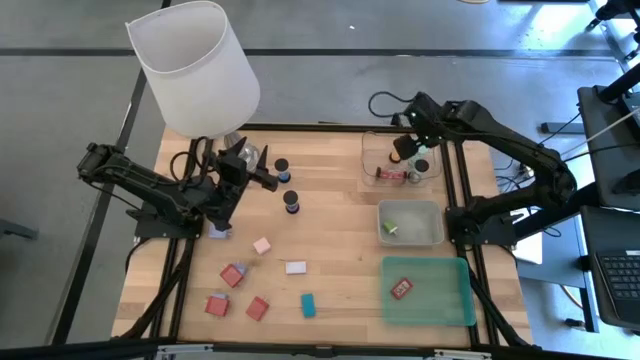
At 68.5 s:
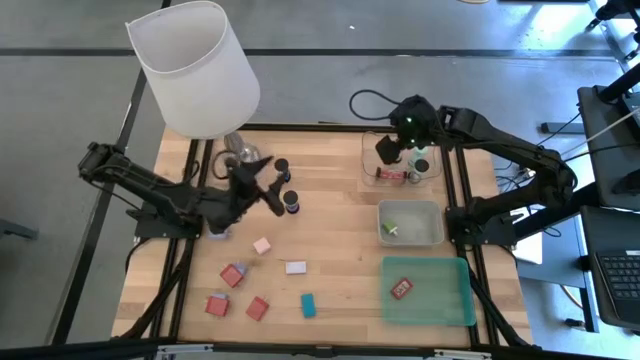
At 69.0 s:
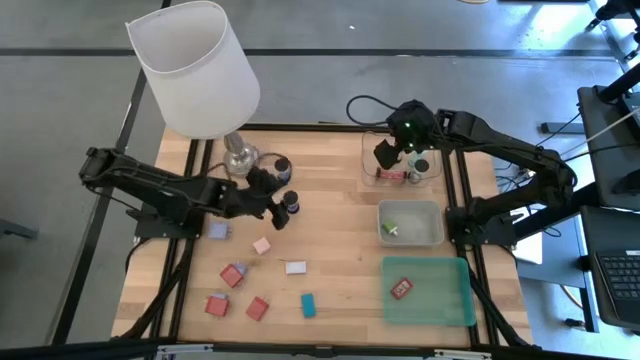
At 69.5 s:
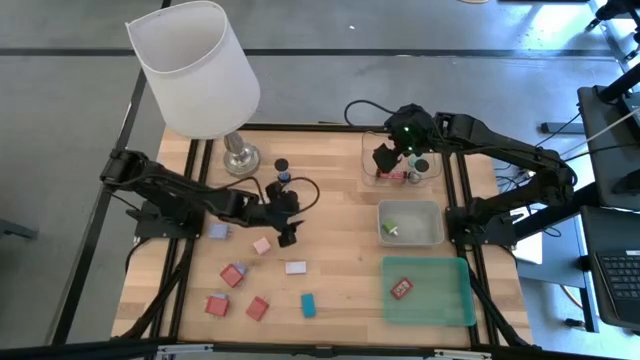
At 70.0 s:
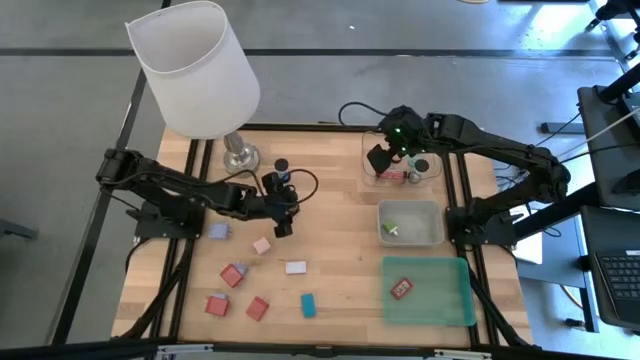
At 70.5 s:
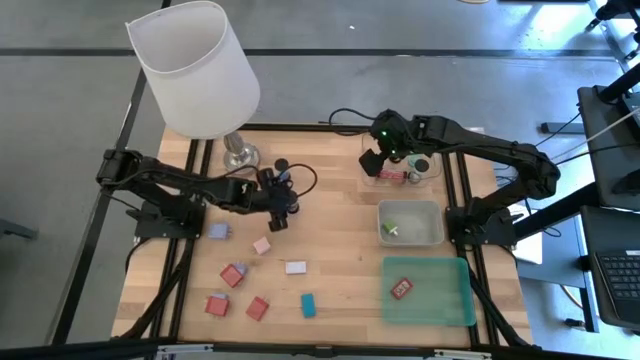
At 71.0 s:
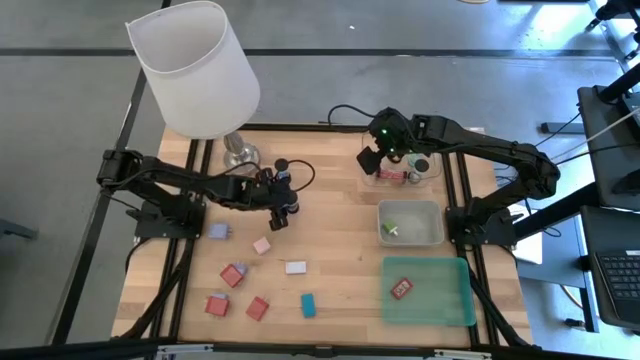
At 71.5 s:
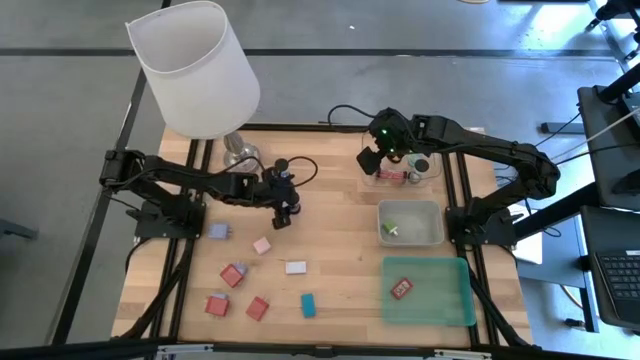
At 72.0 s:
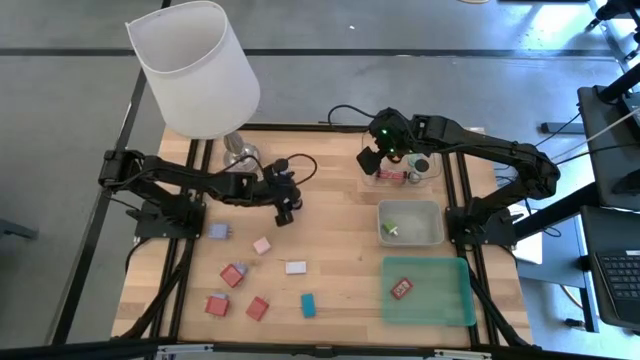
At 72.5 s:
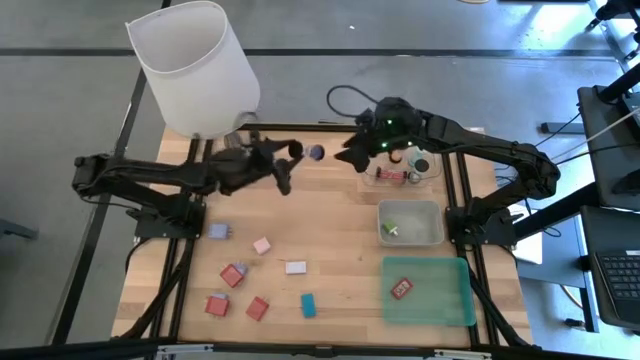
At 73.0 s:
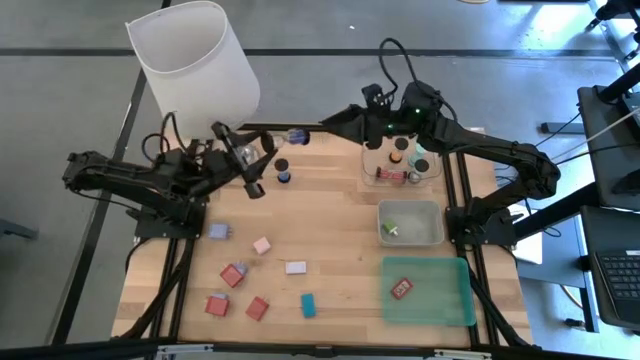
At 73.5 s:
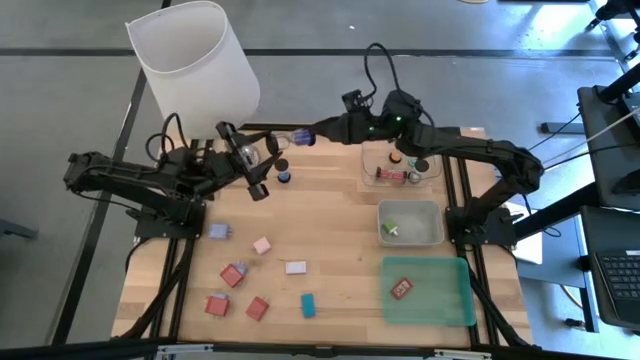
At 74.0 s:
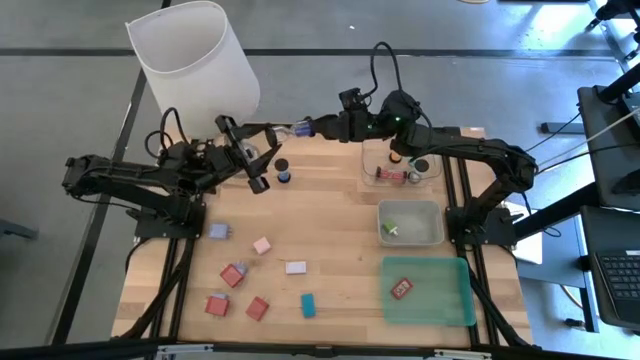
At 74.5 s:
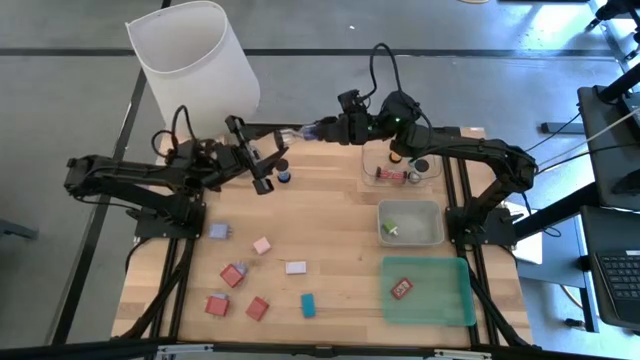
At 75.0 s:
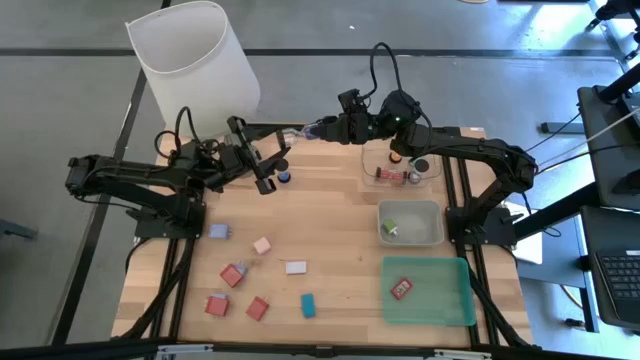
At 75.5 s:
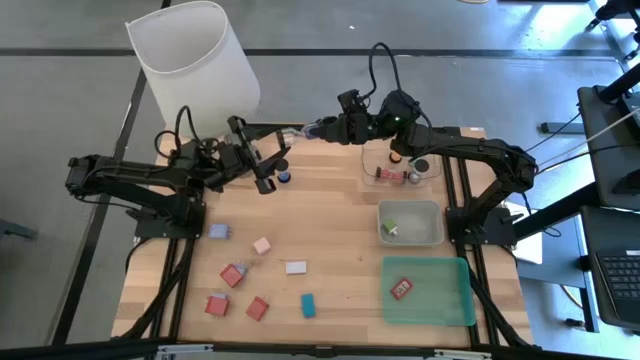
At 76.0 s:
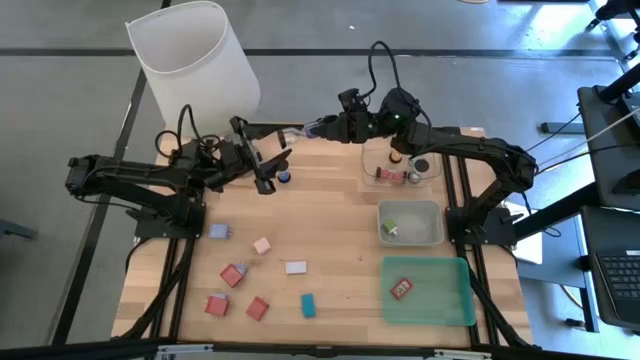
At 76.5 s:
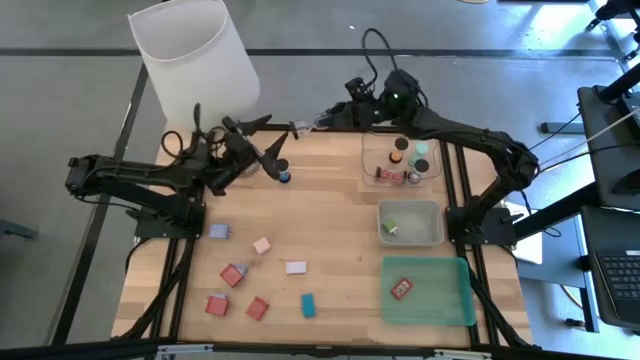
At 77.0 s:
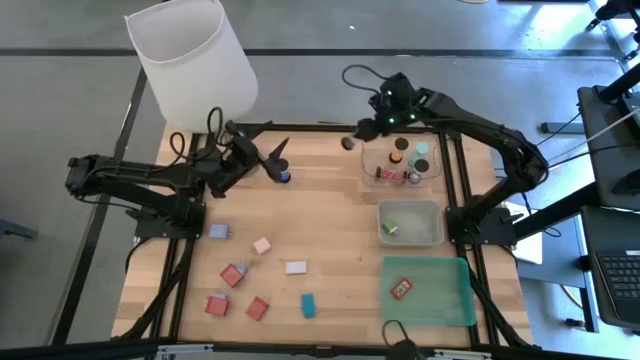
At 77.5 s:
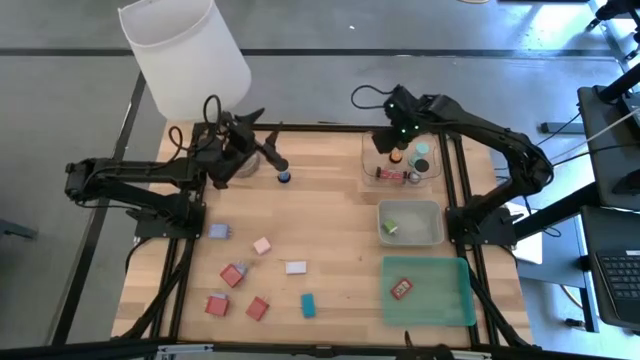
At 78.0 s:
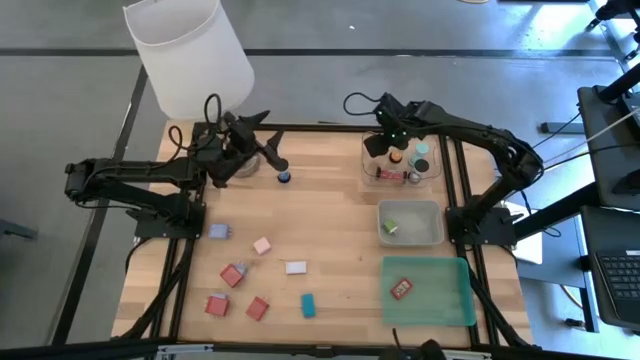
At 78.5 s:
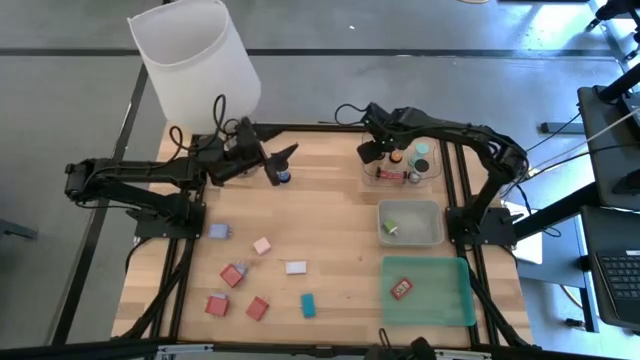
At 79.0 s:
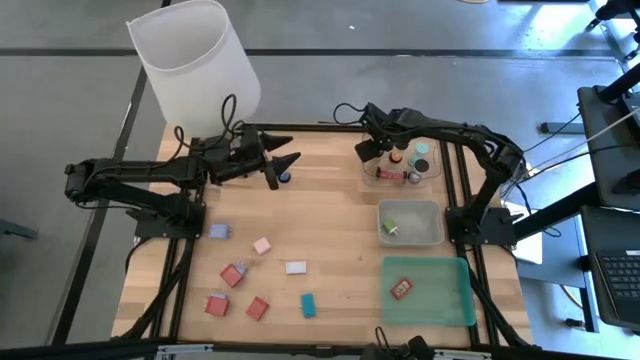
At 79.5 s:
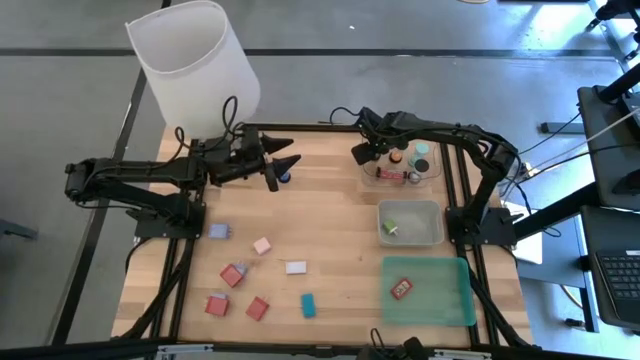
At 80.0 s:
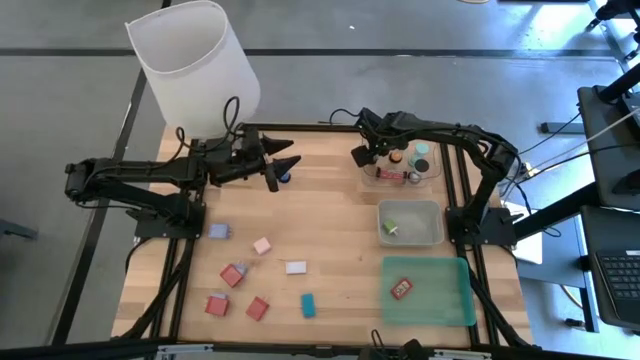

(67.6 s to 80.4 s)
Task: Pick & Place Office items
Put the purple hourglass into the transparent bin

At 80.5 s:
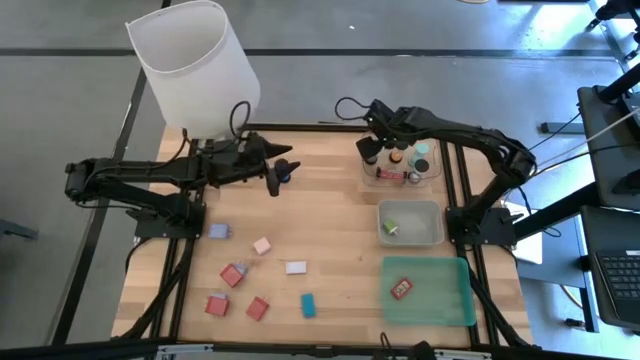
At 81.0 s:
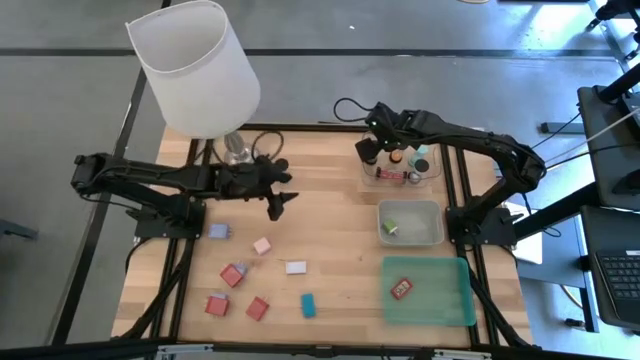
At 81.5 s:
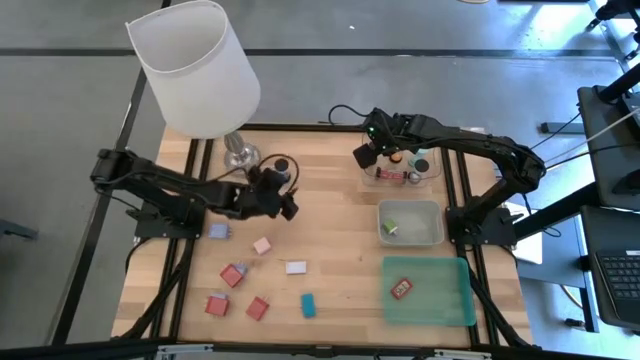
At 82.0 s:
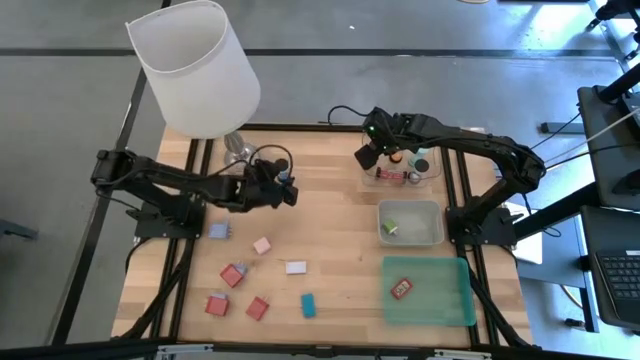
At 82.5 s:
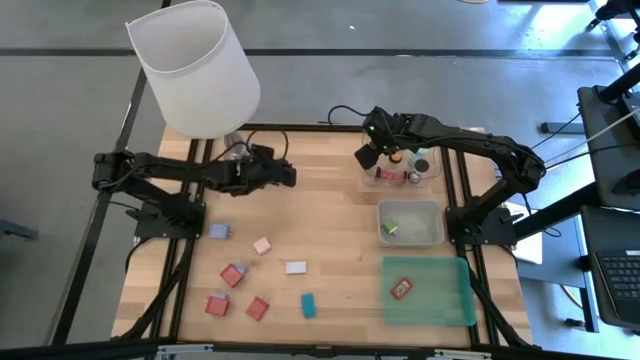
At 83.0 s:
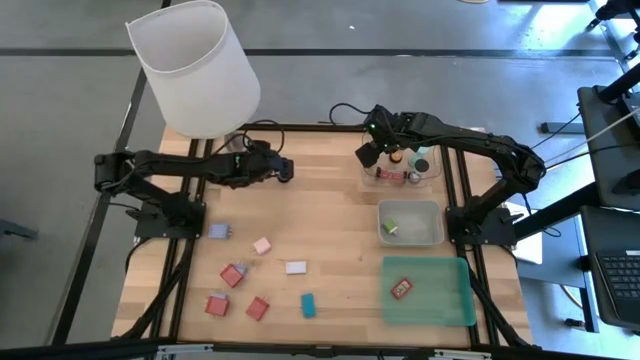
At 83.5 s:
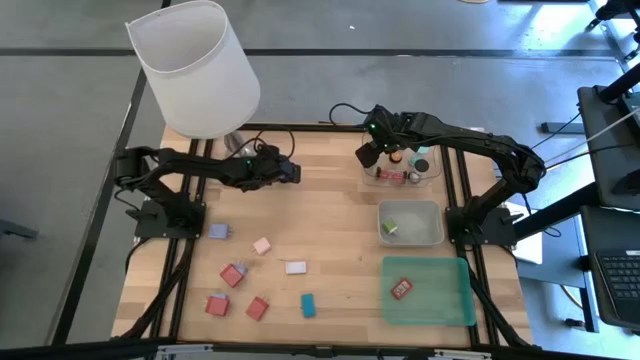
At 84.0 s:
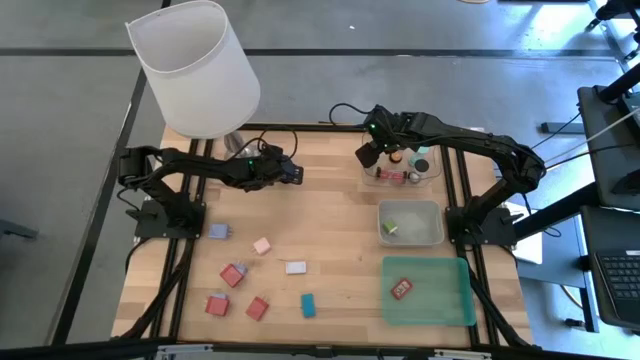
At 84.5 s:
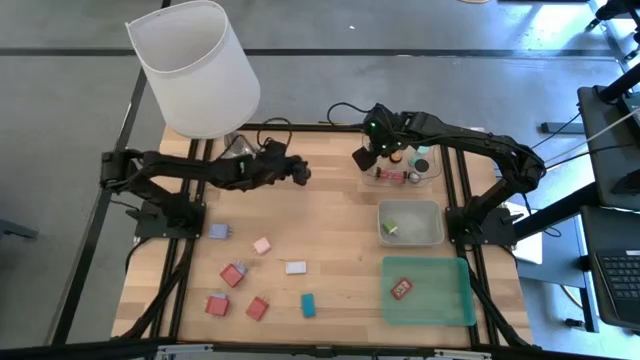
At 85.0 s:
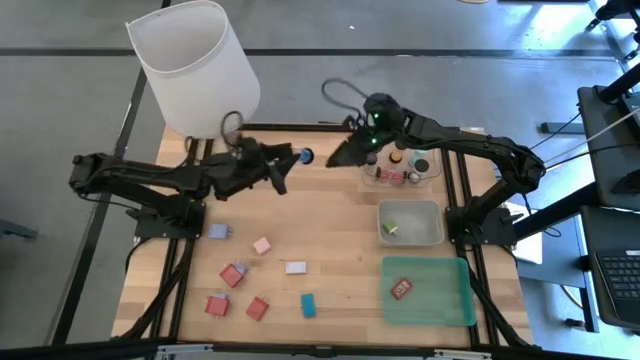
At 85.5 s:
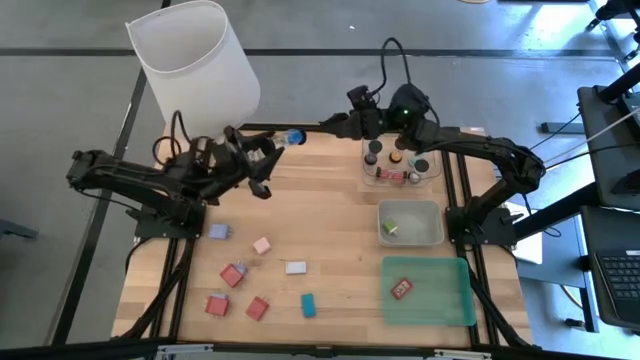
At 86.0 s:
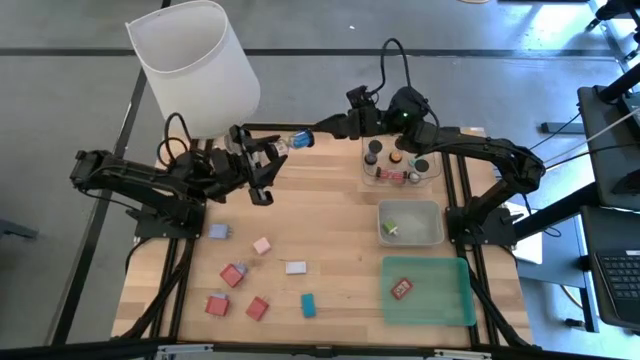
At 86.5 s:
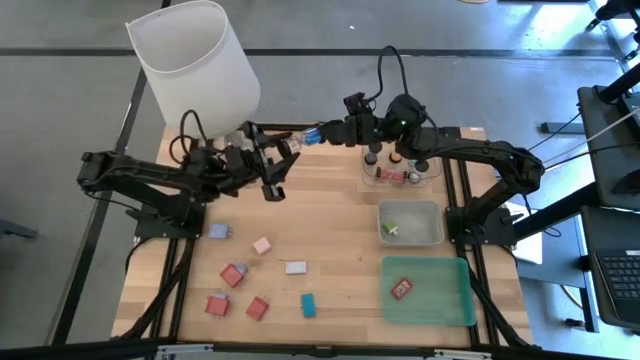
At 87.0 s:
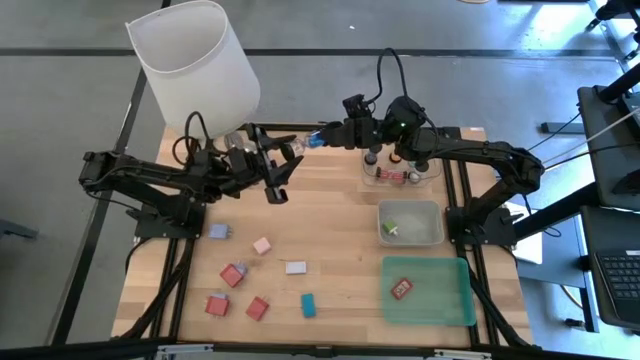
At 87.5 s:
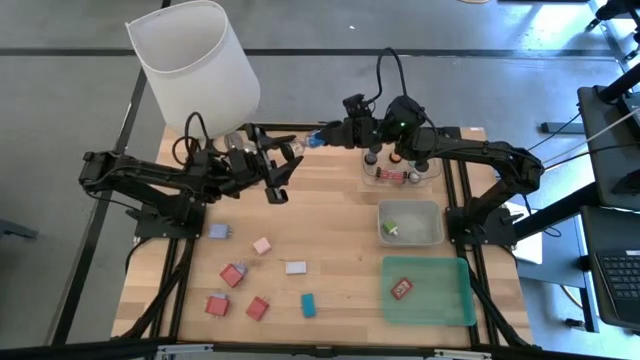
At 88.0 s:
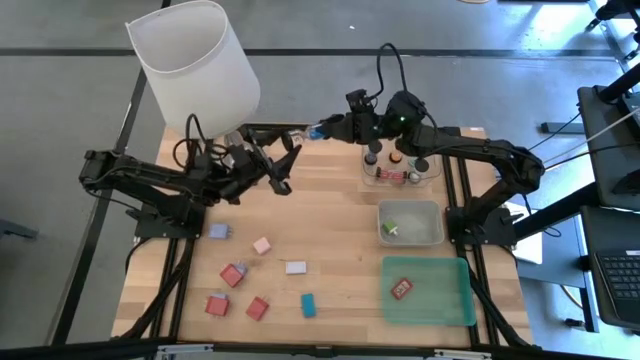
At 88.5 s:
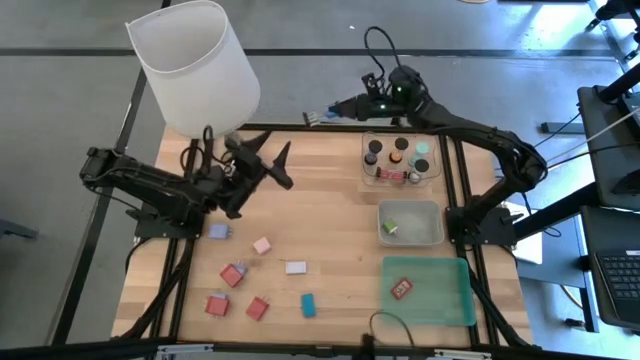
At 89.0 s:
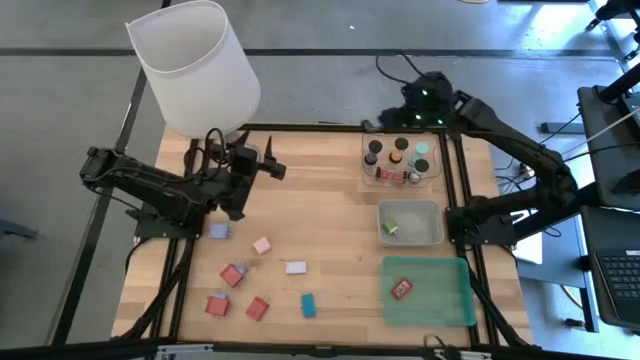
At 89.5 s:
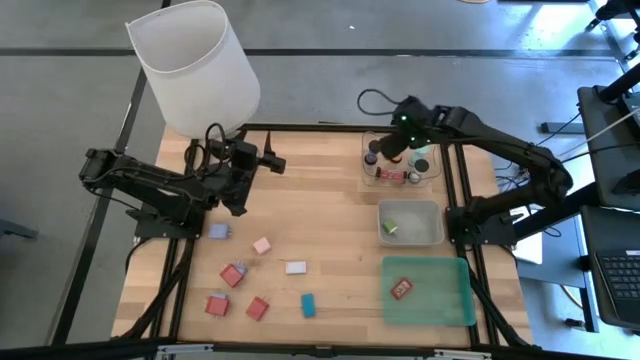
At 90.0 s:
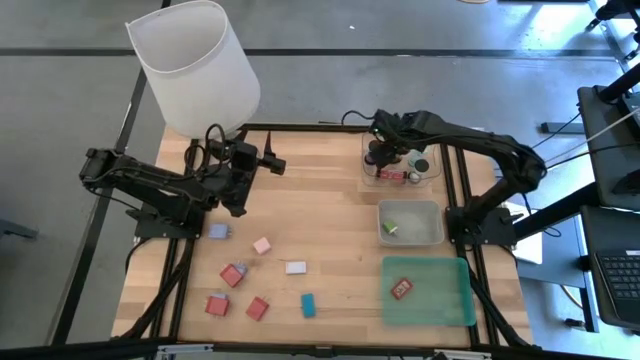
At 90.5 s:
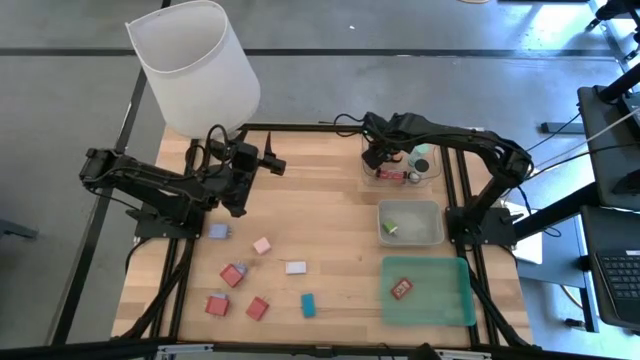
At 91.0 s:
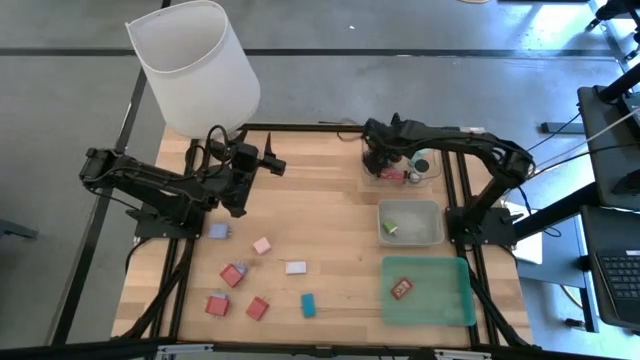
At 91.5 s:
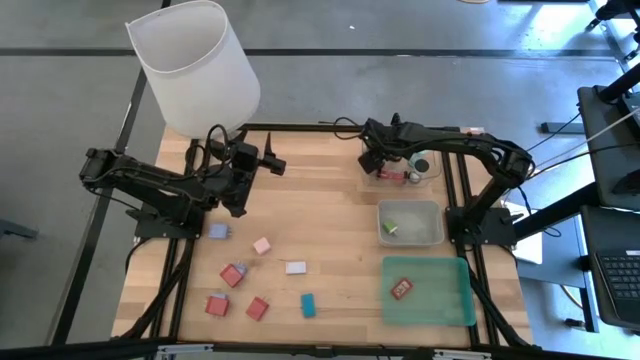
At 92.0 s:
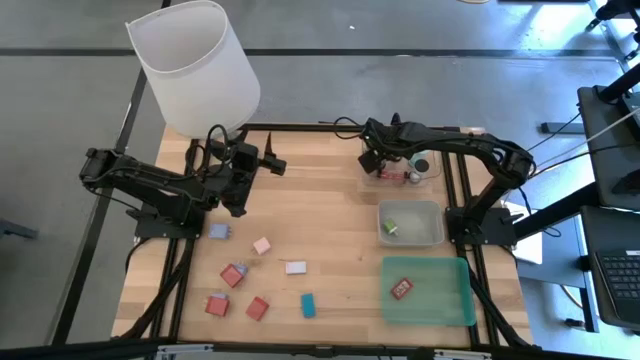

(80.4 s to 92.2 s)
Put the blue hourglass into the transparent bin
